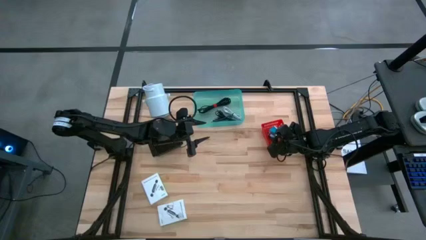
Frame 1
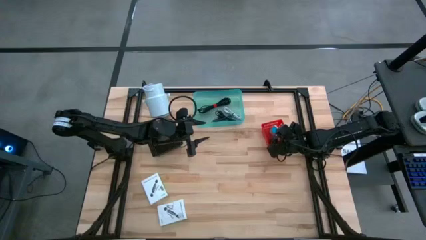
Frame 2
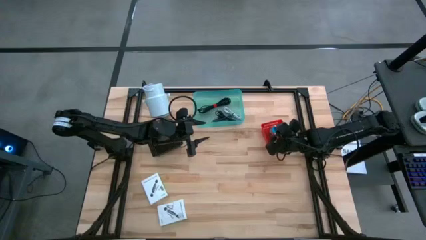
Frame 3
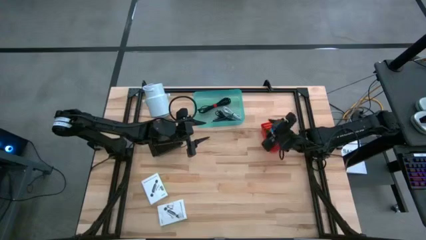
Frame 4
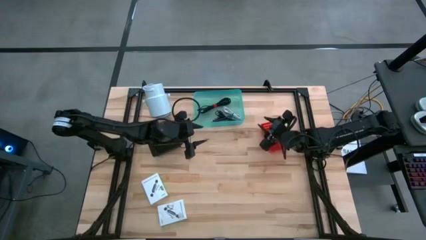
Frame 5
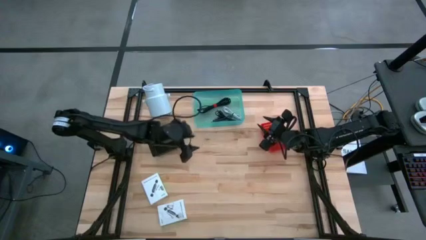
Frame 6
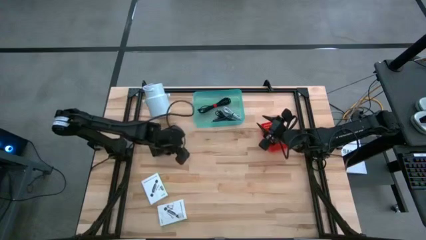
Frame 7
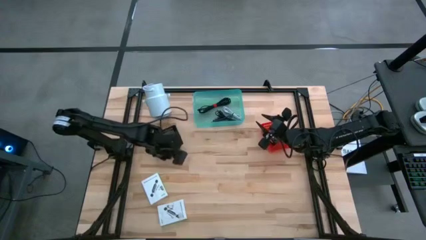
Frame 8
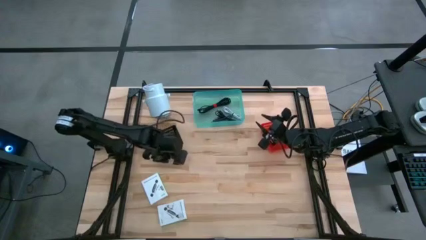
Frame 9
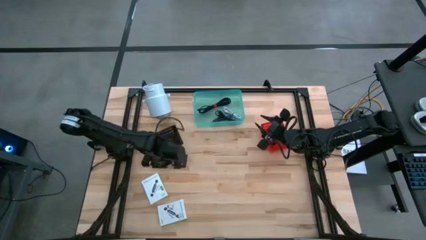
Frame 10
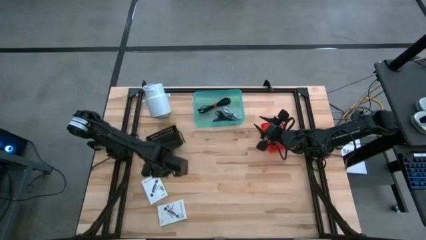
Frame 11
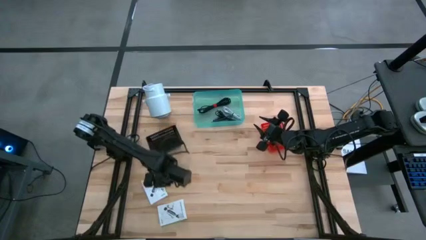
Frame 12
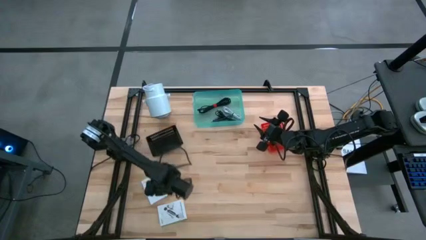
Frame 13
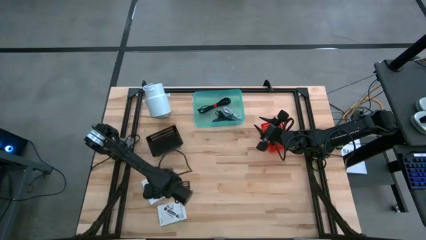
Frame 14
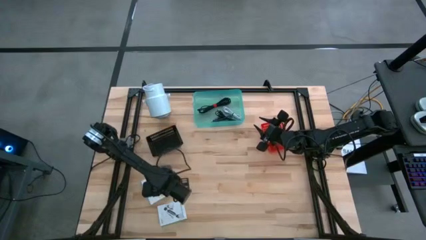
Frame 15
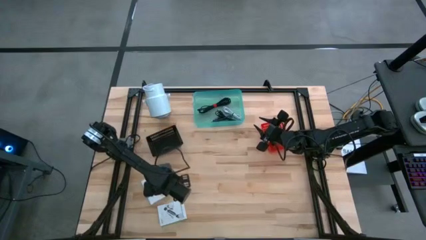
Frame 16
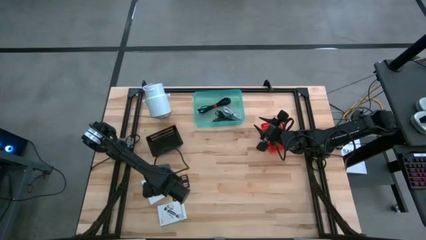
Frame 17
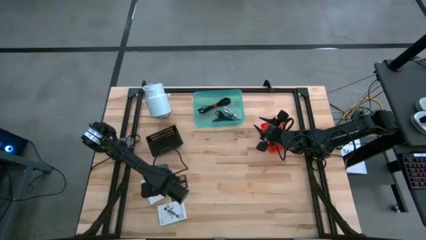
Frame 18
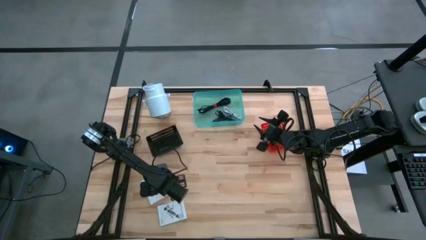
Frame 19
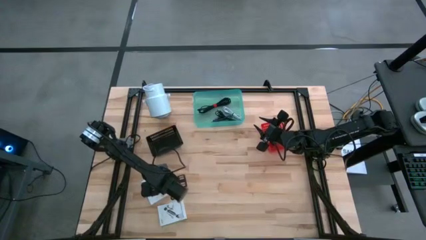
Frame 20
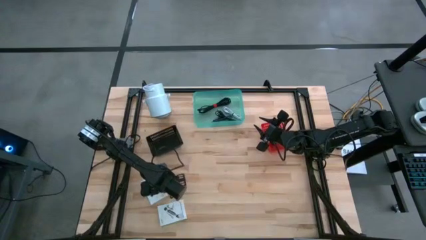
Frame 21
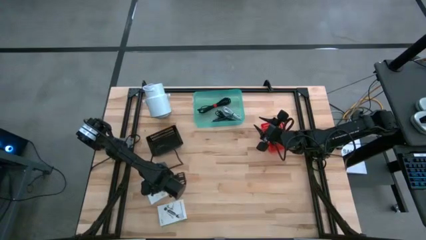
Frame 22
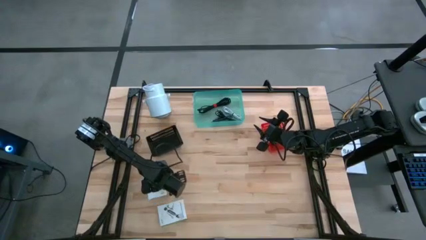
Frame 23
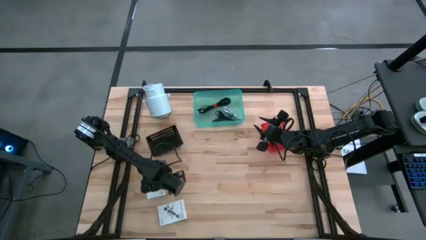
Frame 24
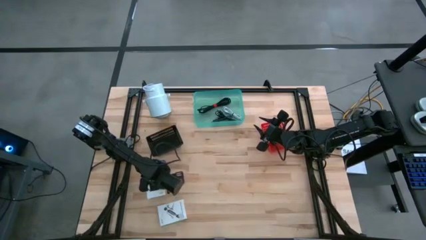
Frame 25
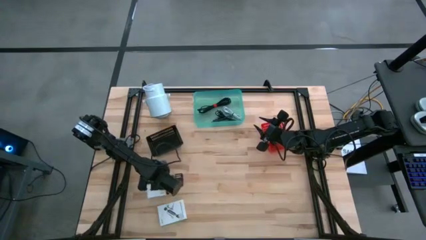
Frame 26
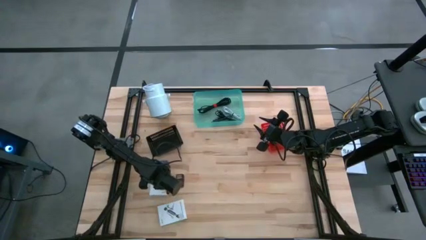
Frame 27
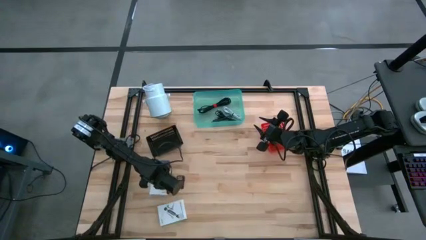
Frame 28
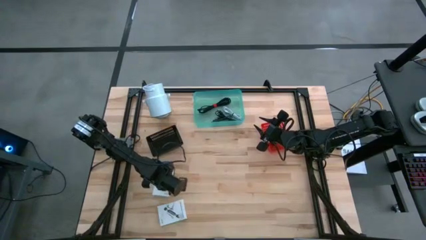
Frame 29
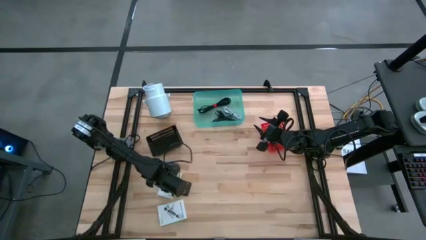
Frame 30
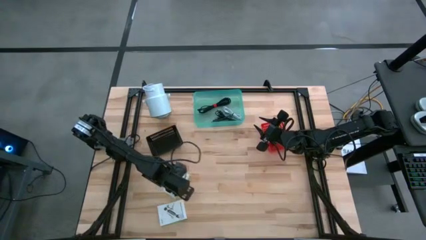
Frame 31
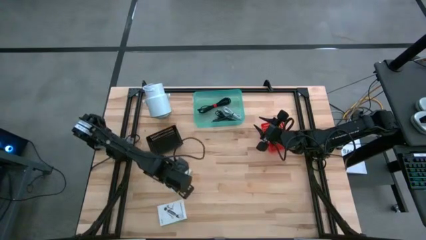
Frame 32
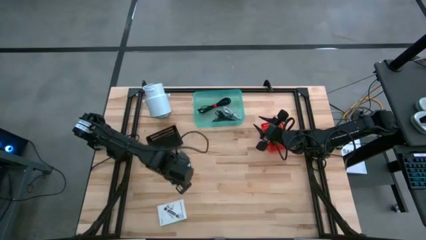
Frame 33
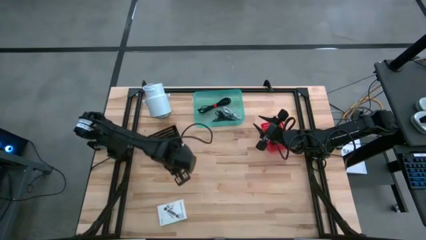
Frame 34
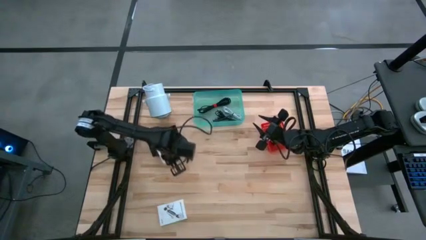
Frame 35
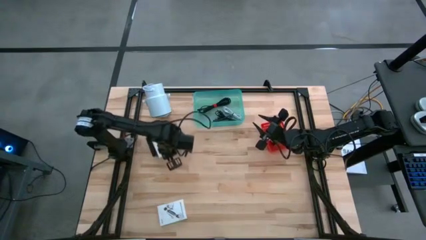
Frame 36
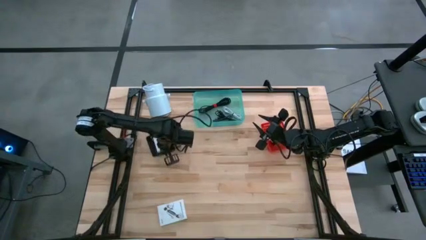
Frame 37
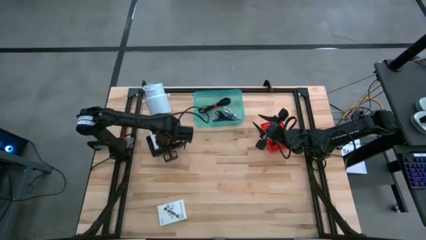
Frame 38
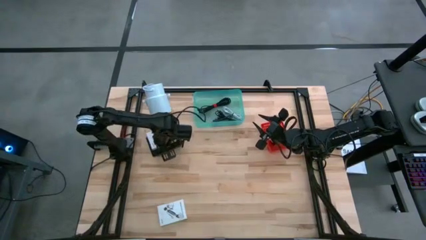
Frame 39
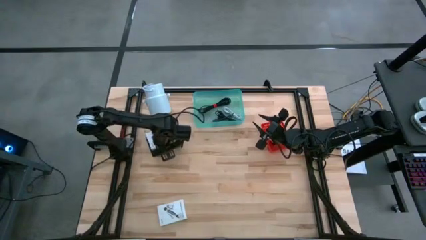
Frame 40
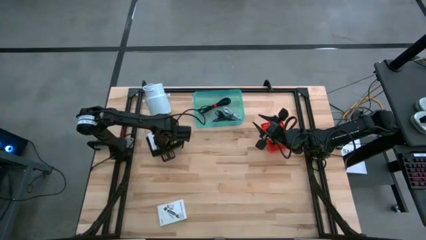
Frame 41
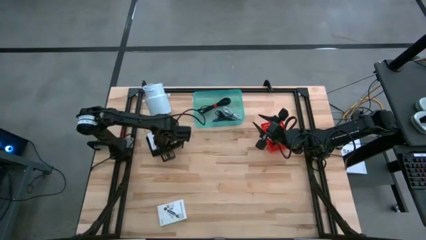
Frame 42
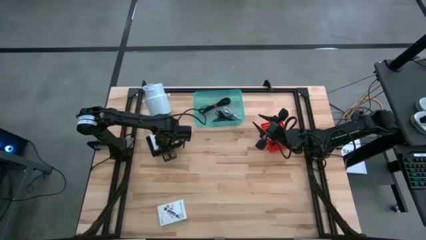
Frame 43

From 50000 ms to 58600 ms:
Task: Pick and place items into bin
Put the top white card reader box into the black bin

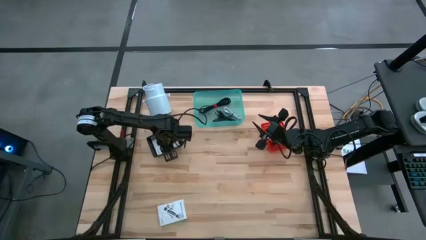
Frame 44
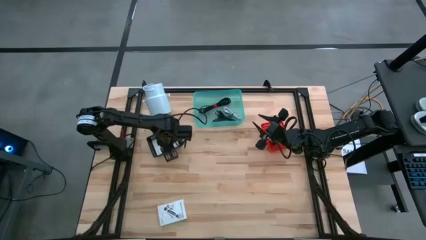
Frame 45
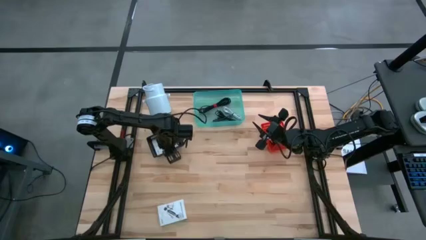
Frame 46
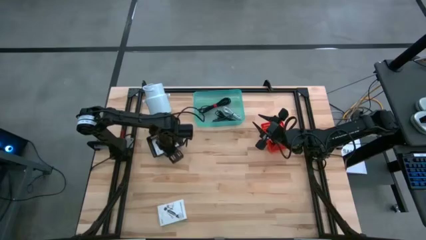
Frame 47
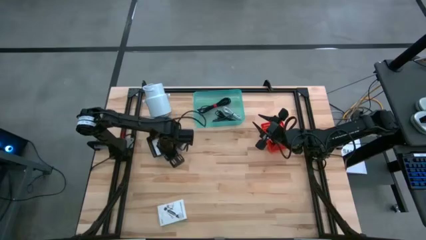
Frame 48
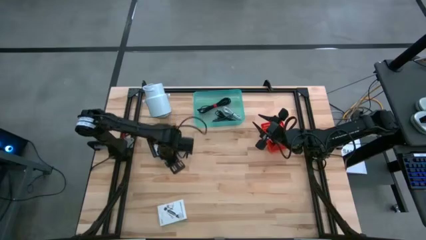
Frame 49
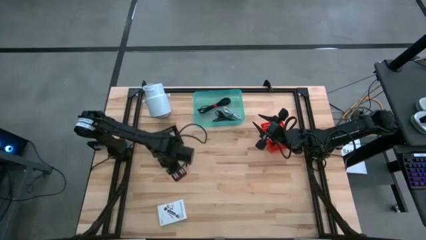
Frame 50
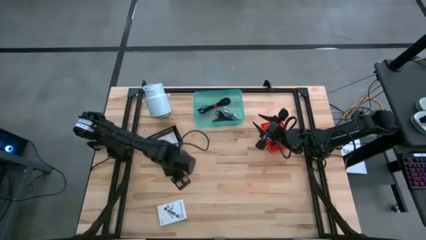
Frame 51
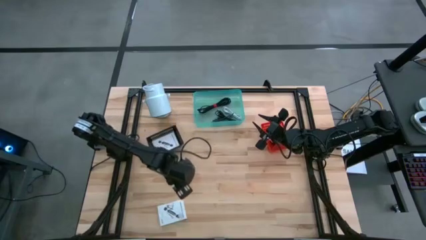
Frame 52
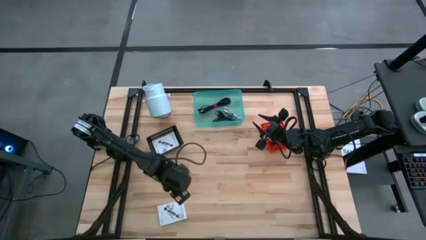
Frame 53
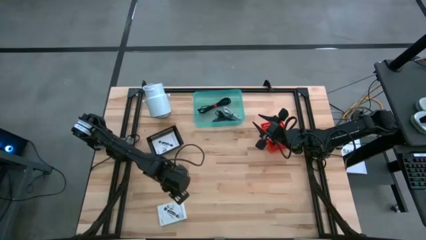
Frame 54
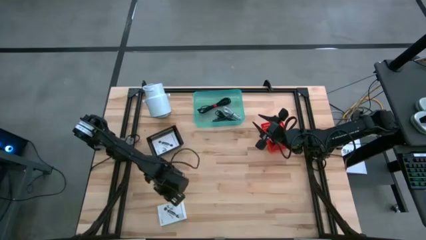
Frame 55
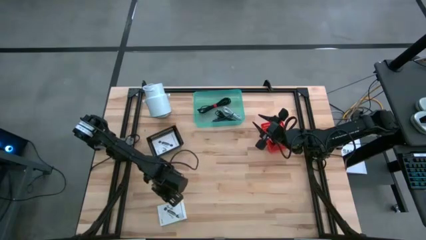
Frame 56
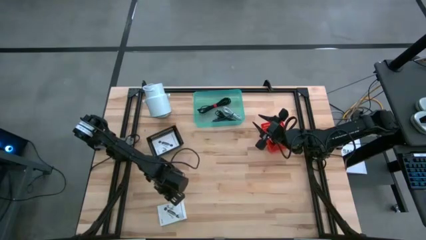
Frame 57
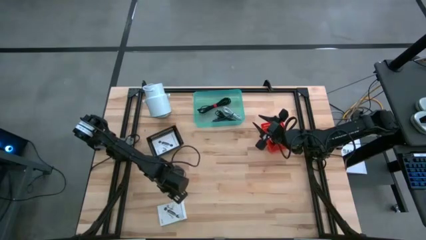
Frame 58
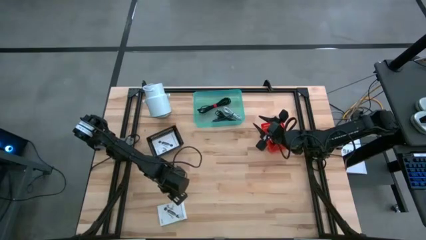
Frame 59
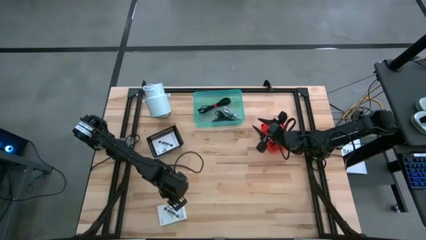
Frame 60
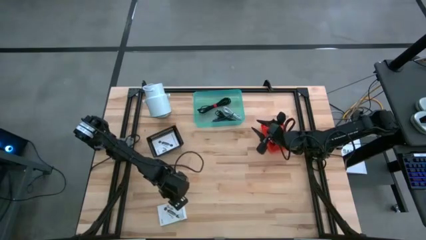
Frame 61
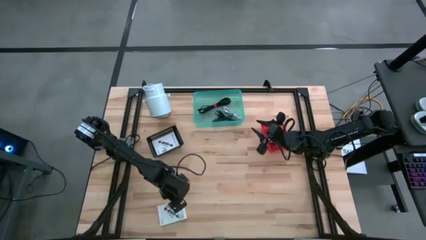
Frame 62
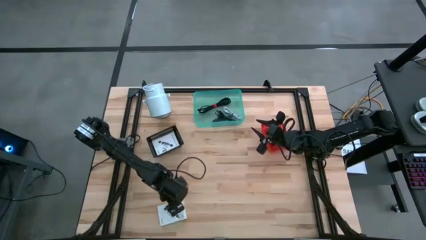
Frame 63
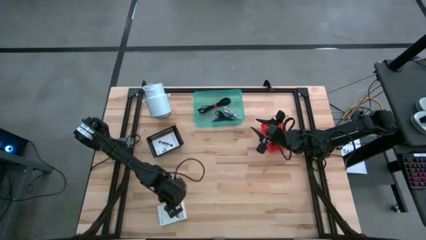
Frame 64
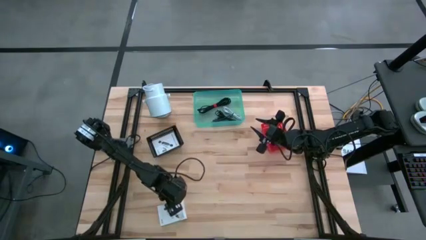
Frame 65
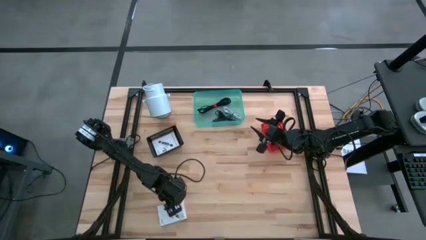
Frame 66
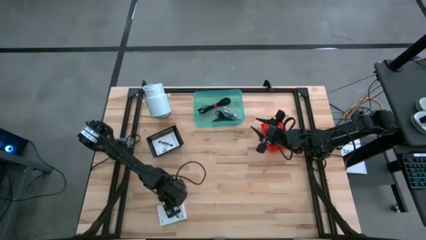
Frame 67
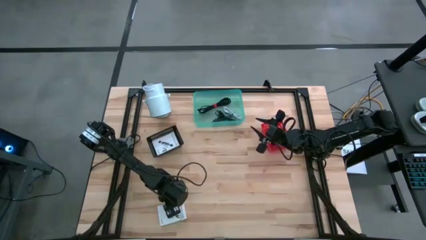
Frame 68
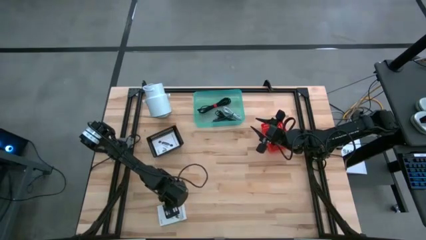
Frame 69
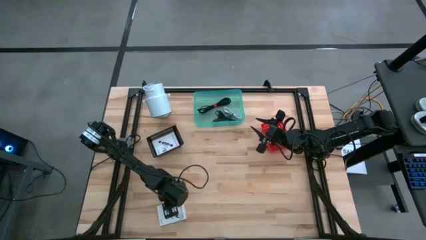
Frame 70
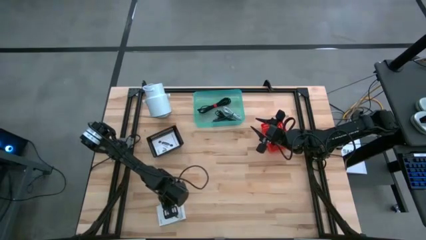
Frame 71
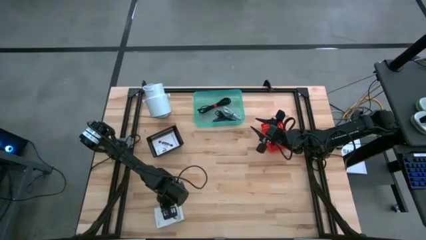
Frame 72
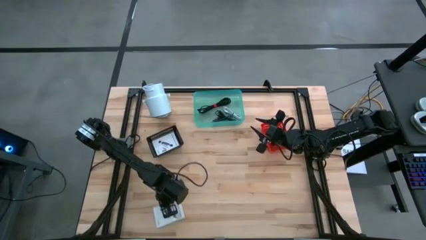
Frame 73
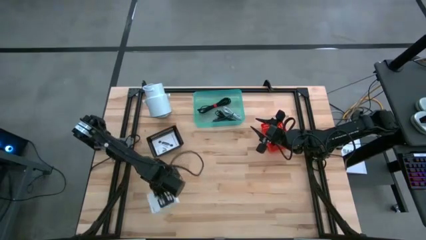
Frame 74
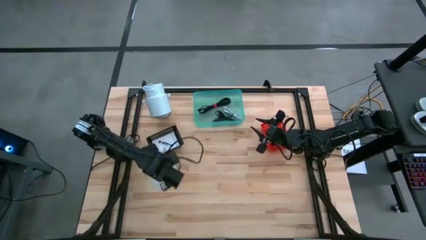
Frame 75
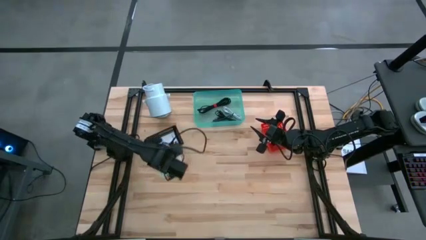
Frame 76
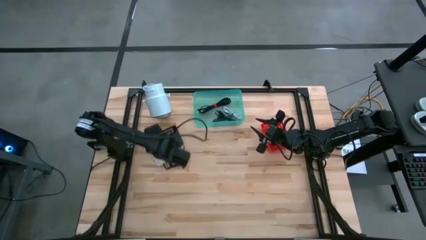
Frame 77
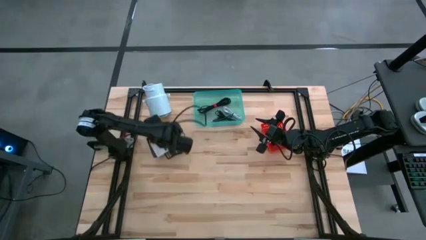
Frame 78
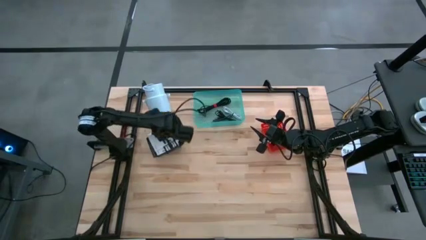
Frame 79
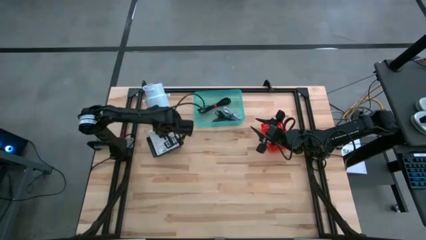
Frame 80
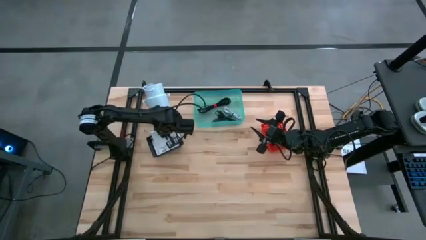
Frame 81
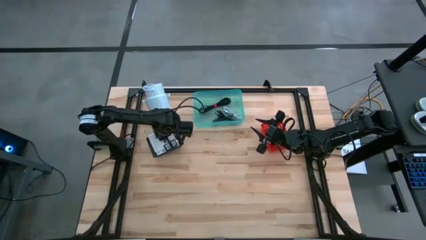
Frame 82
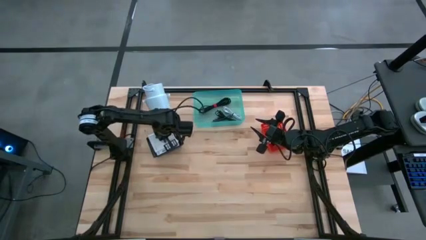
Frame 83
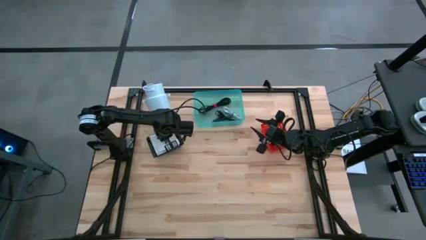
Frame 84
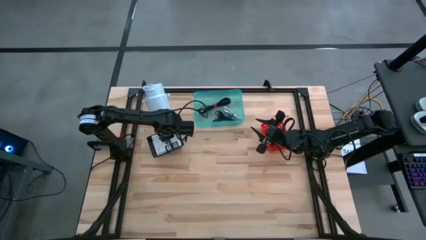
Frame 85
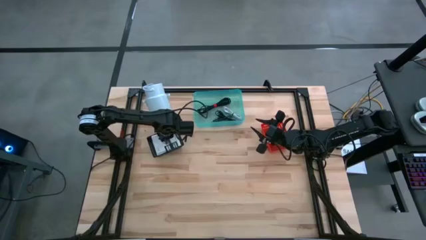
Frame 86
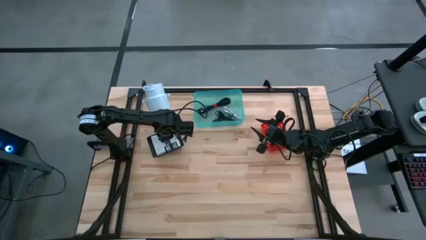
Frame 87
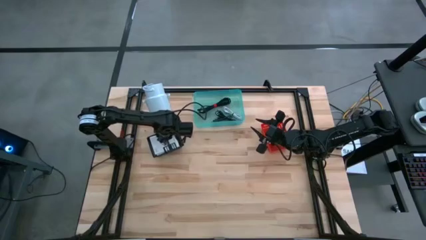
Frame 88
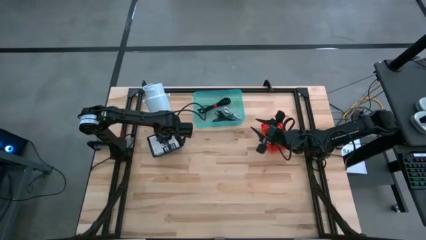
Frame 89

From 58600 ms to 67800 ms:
Put the white card reader box into the black bin
